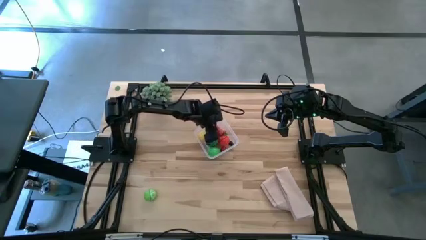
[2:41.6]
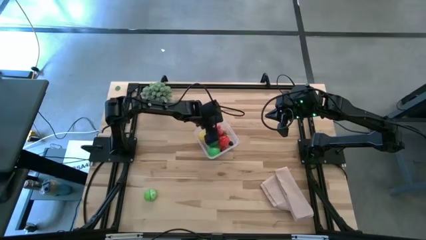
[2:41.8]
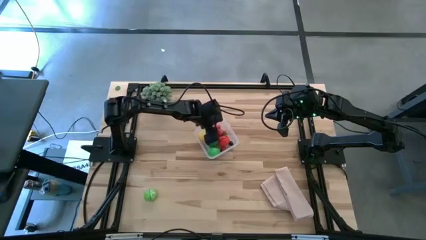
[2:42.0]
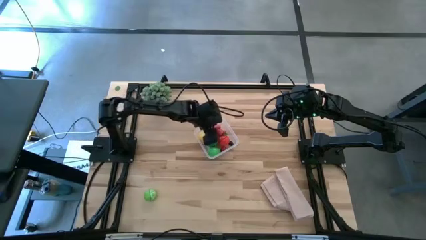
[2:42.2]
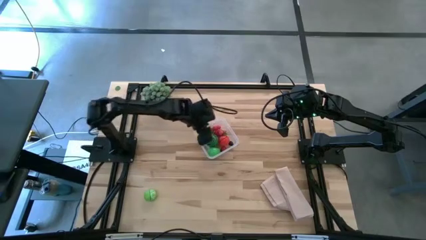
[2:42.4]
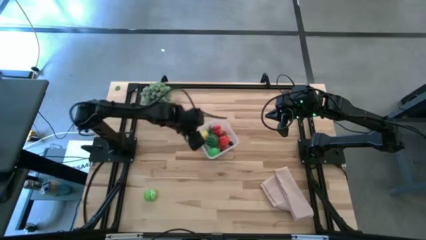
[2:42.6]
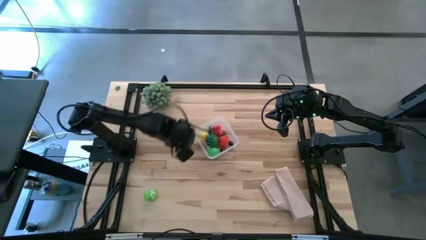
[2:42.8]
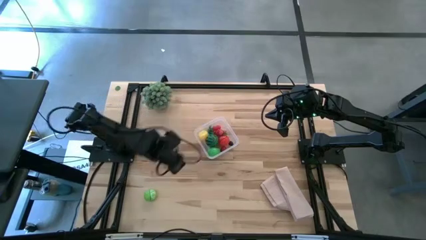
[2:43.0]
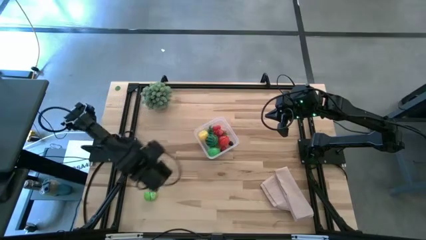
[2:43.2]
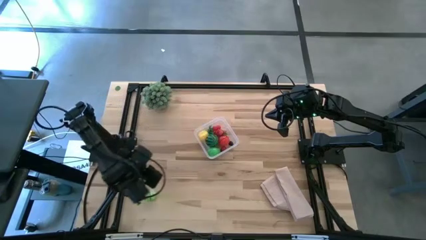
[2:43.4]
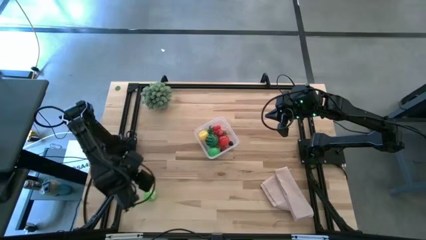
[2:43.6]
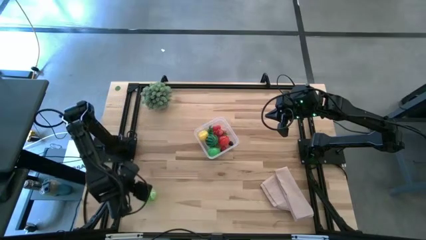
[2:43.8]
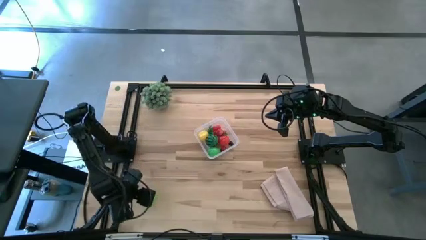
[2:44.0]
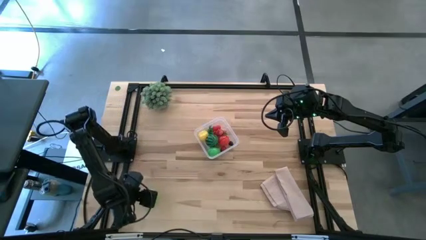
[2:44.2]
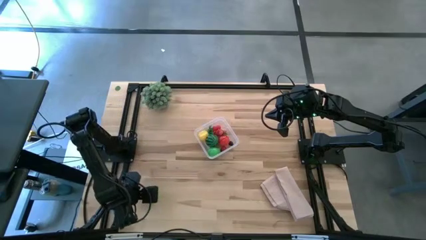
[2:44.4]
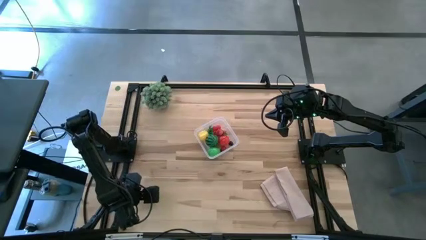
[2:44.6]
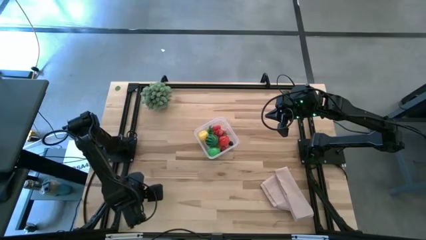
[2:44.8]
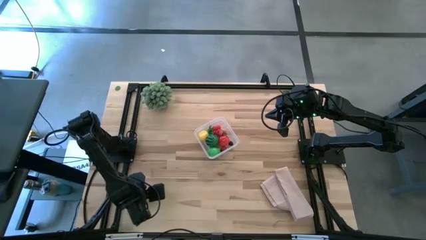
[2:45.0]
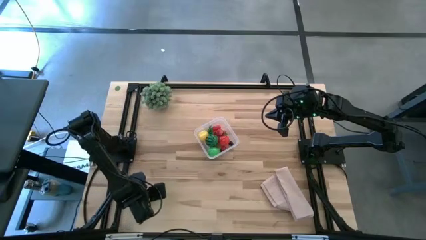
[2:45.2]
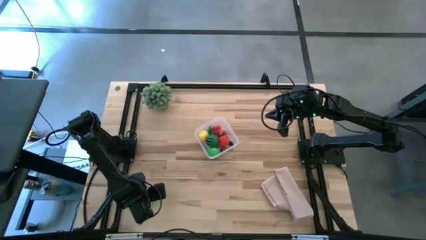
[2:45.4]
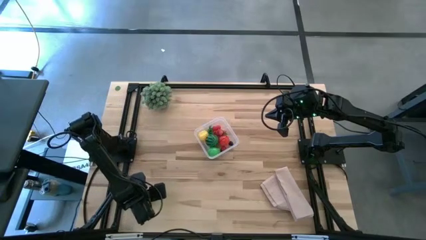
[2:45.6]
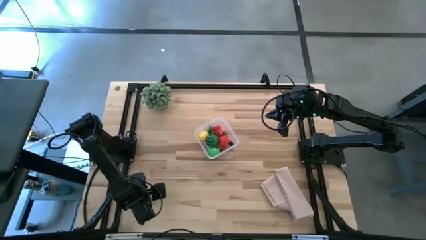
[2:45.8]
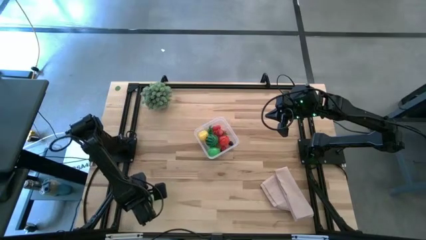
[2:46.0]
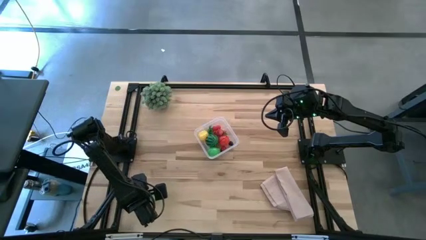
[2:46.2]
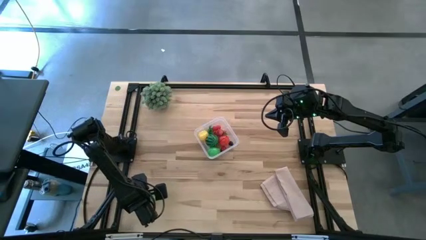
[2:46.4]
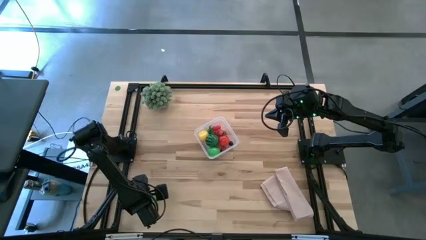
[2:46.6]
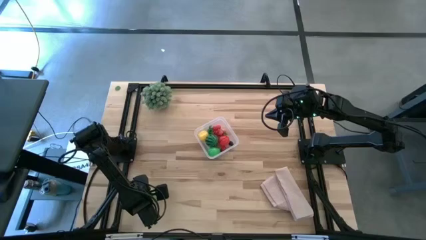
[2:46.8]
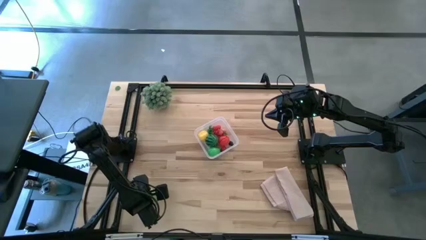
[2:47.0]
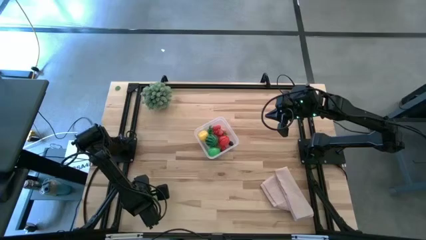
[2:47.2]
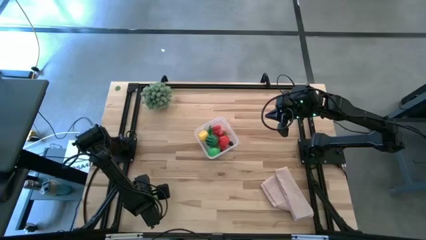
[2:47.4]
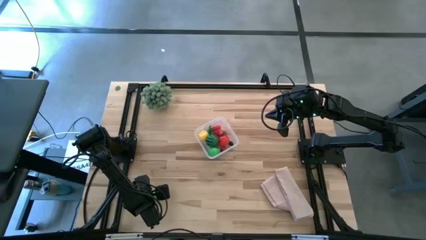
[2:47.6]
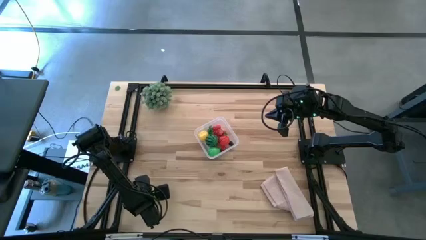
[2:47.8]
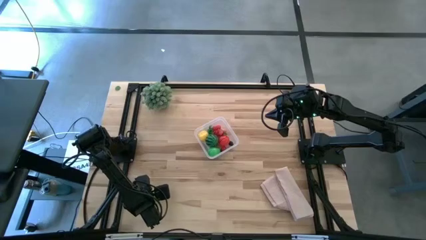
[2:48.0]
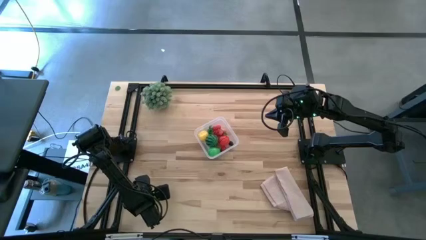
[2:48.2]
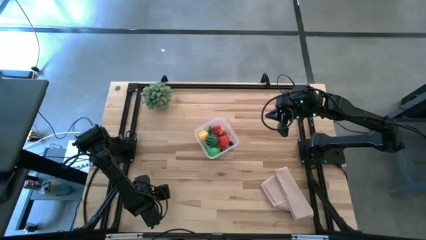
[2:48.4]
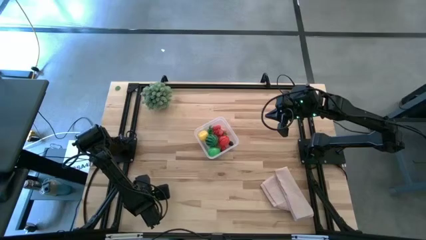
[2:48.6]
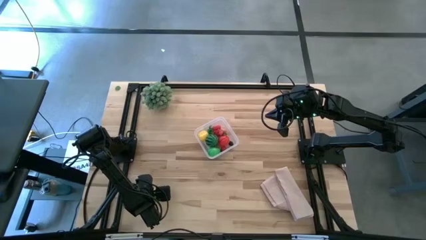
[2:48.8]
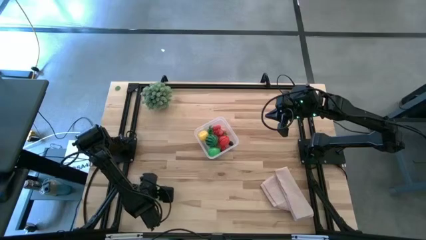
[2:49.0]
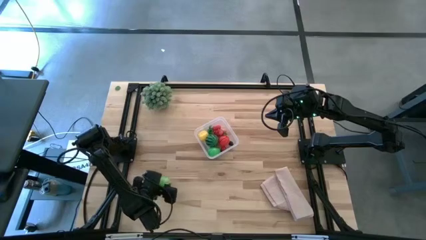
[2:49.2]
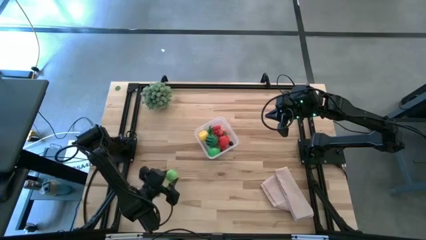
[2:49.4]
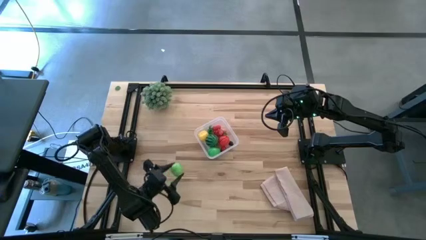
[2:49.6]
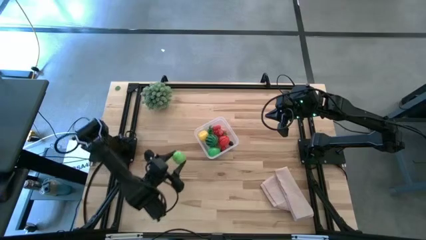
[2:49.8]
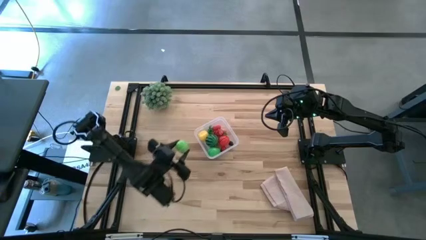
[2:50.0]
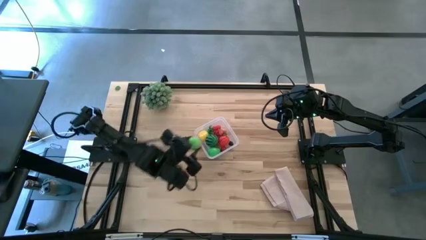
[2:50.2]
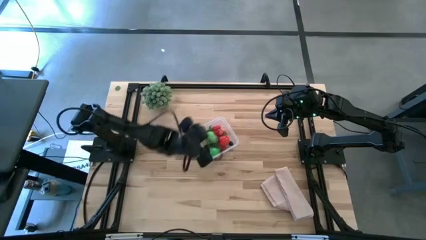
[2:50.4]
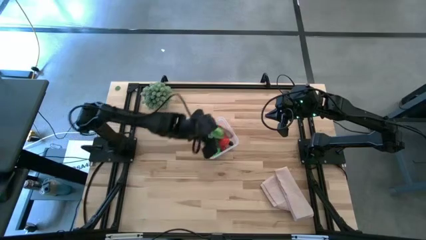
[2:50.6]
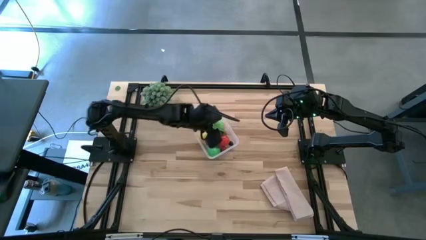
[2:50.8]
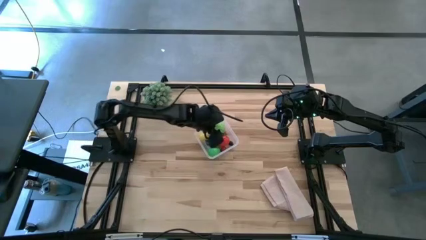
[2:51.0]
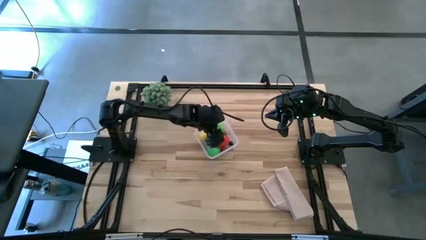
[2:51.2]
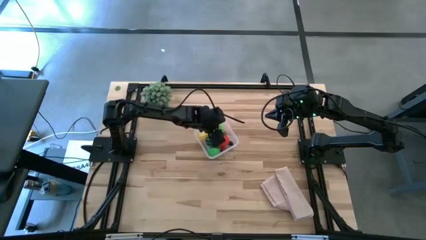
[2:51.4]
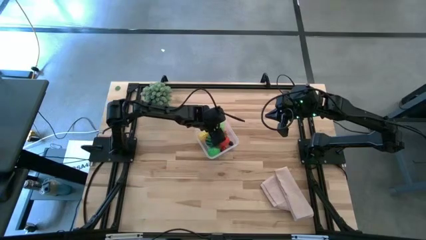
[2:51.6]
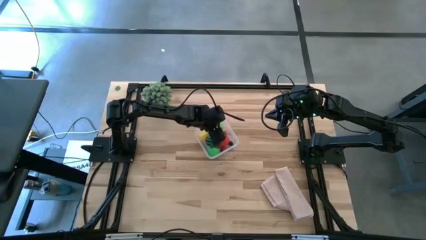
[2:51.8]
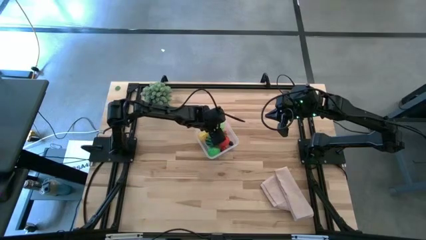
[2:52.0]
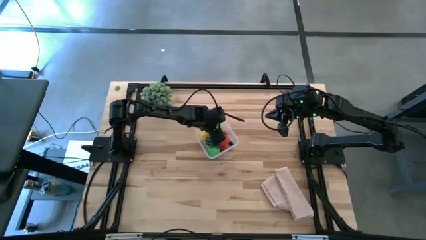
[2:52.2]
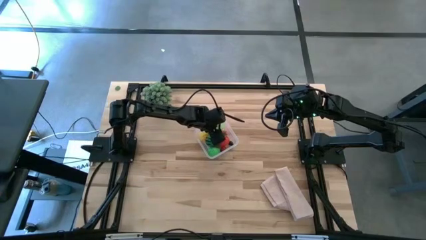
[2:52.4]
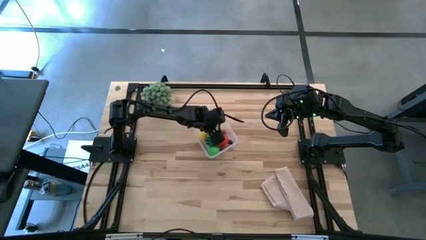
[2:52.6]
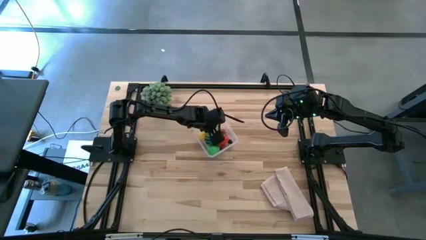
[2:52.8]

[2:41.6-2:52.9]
Task: Pick and placing Produce into tupperware
Put the green cabbage into the transparent bin

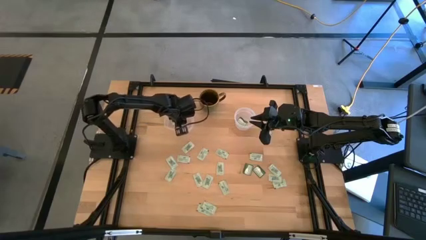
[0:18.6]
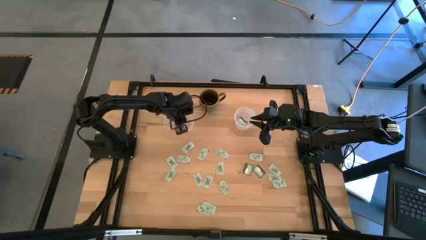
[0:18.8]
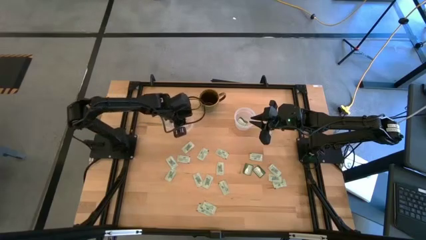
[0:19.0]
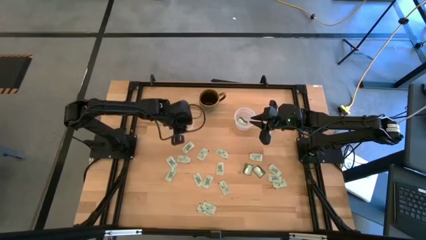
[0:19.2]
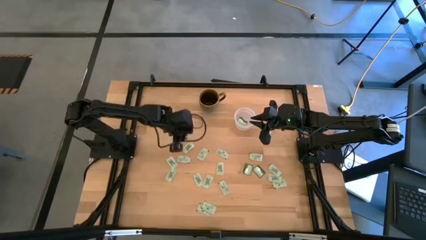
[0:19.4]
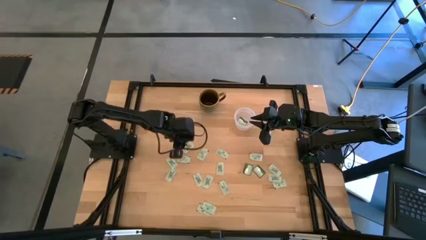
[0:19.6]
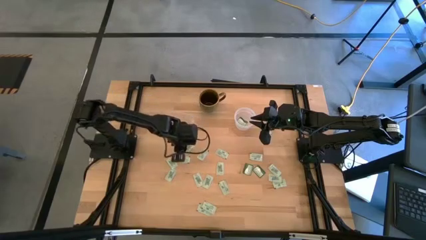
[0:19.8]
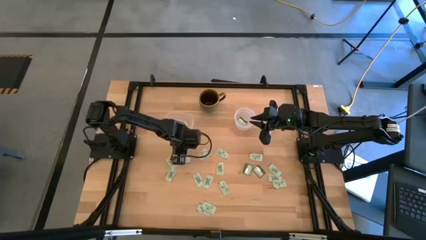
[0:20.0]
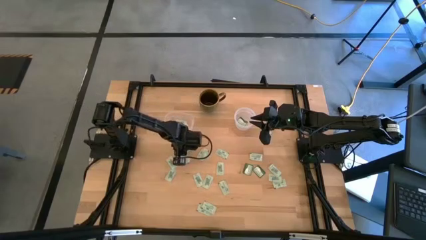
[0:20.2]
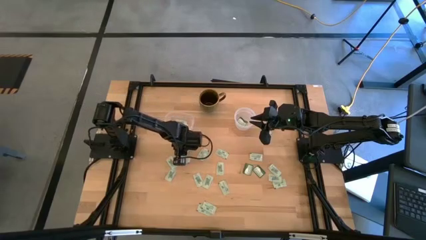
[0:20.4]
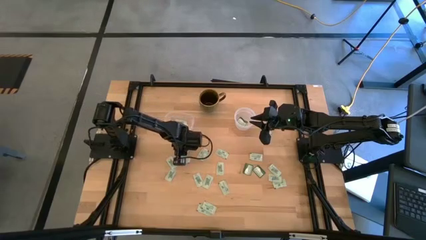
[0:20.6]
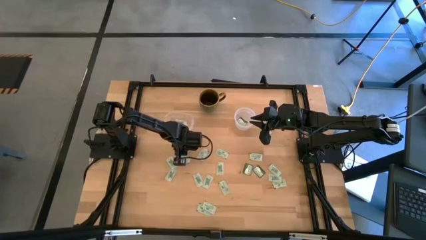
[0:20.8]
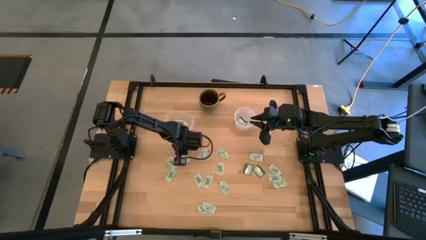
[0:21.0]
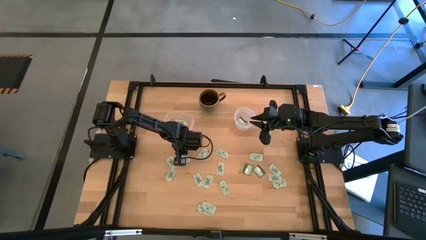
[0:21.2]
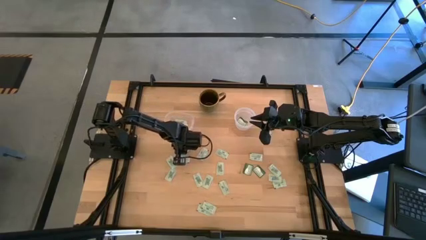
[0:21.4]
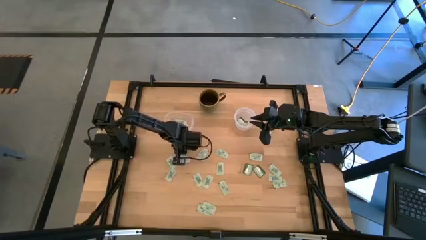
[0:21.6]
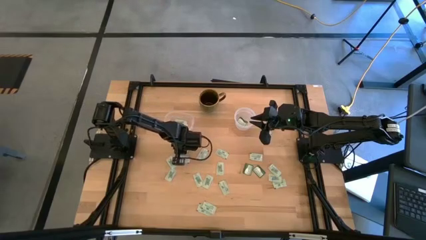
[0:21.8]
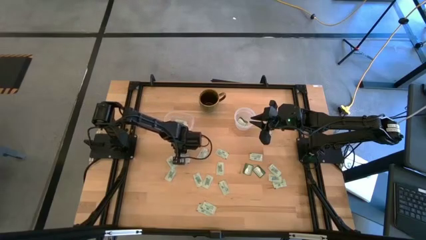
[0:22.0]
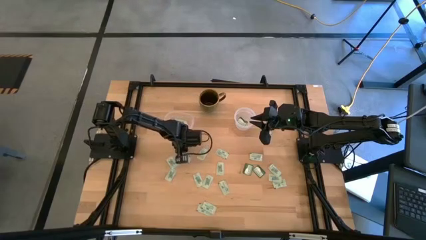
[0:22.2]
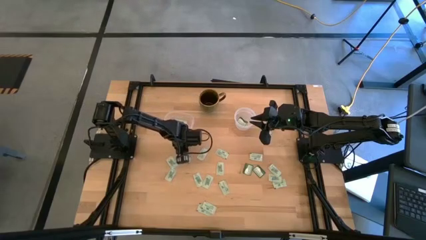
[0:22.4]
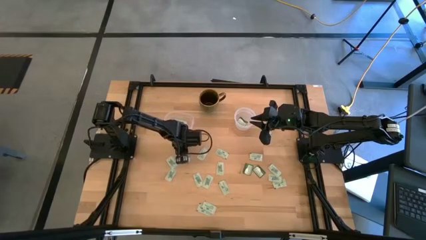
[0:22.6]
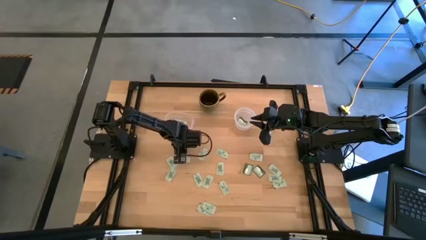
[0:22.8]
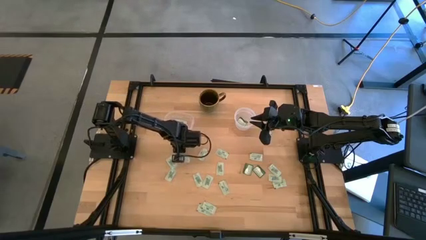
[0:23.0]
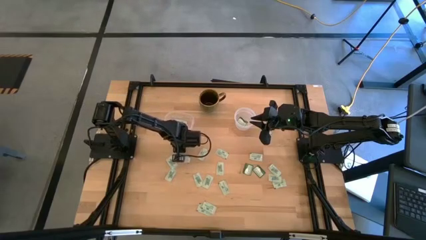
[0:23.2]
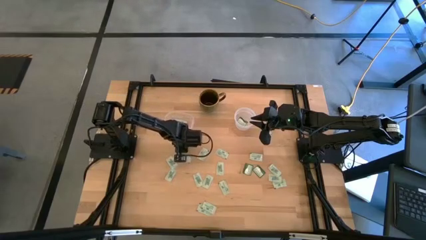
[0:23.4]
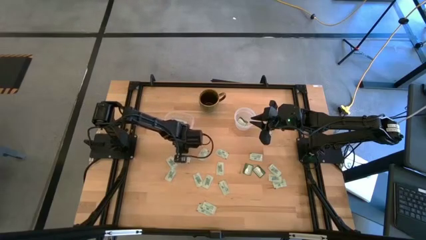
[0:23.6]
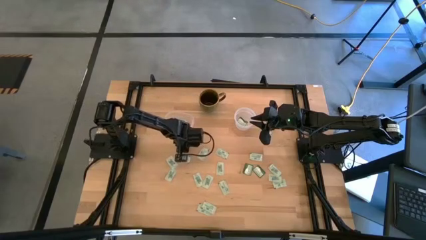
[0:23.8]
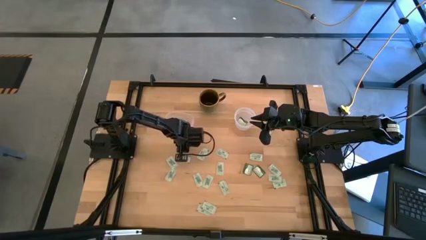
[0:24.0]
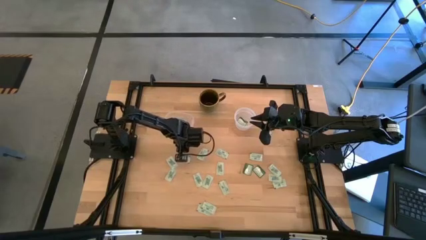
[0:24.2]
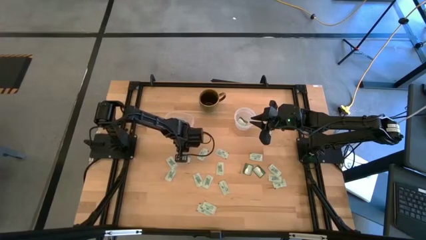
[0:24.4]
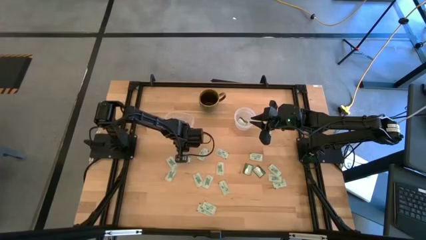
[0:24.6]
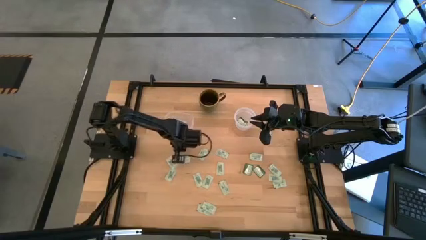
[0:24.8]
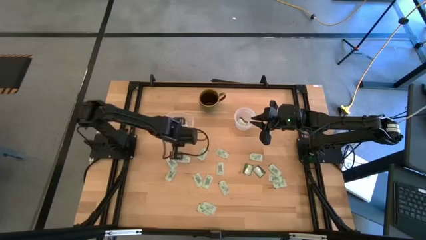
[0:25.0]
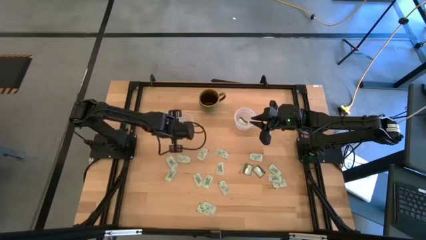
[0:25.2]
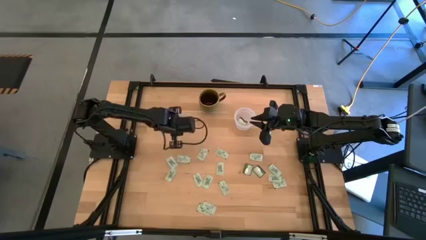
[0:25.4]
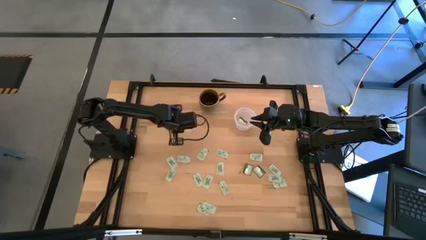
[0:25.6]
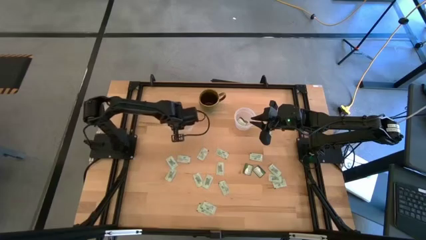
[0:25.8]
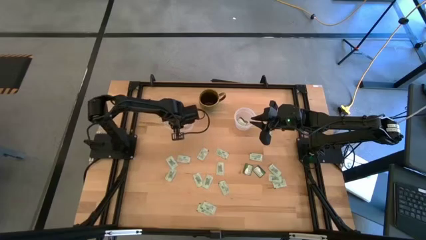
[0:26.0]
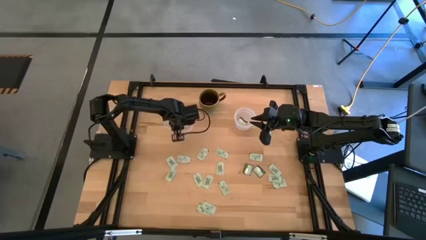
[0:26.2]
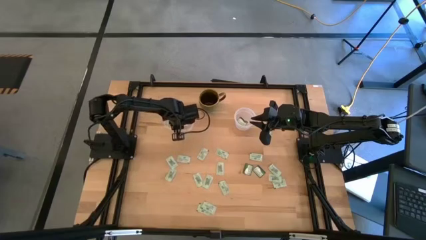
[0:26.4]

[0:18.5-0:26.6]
Task: Pick and place Stevia / Truvia into bins
Put the light green stevia packet into the left transparent container
